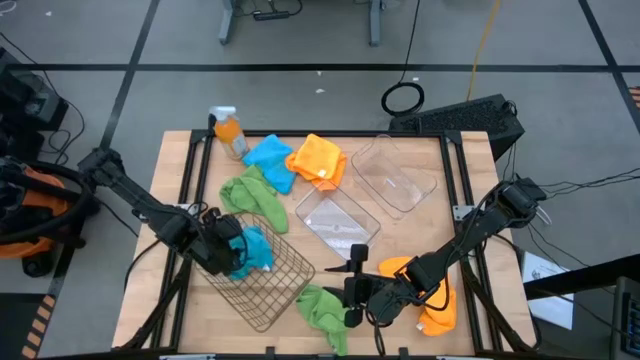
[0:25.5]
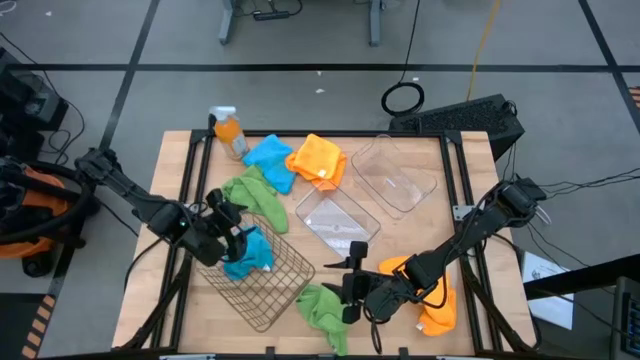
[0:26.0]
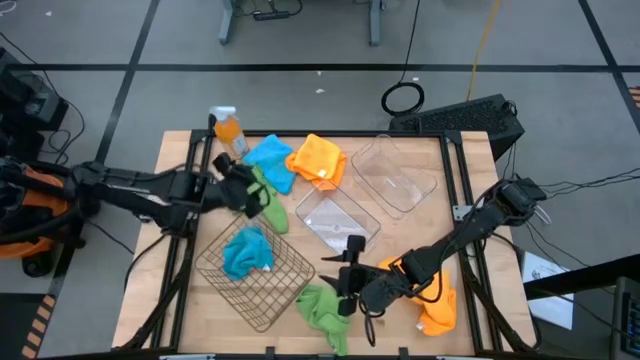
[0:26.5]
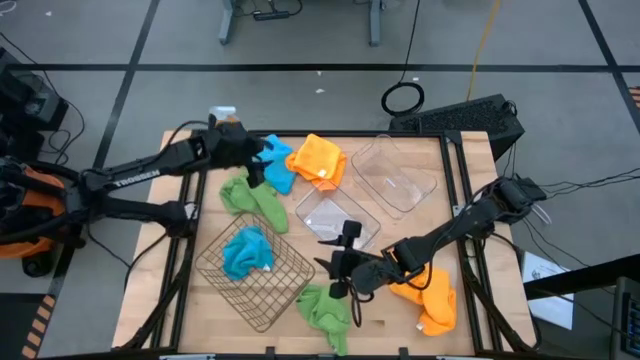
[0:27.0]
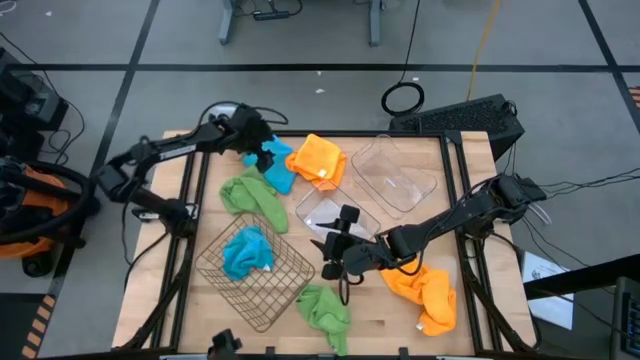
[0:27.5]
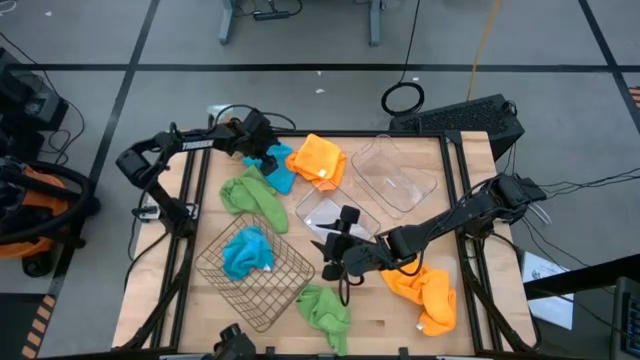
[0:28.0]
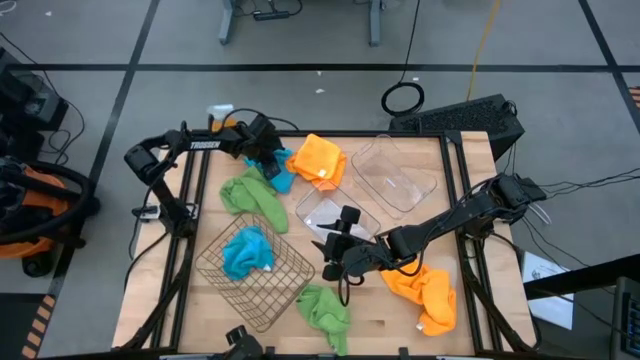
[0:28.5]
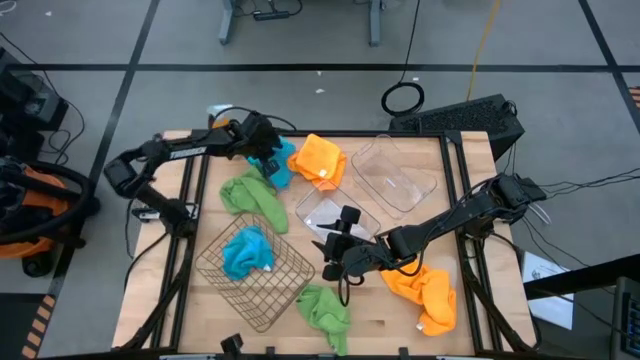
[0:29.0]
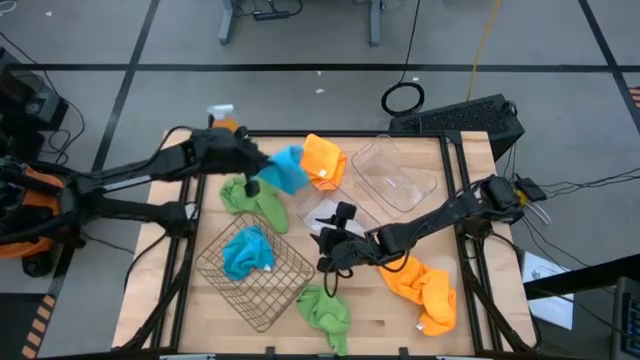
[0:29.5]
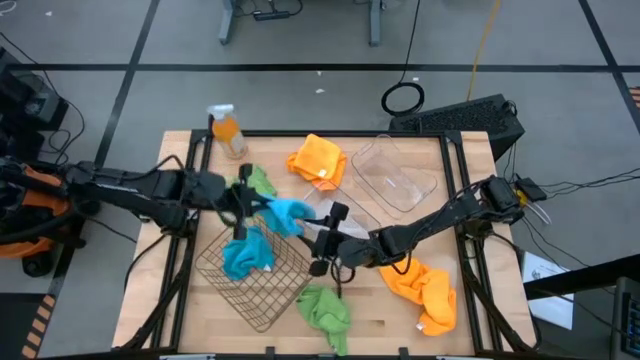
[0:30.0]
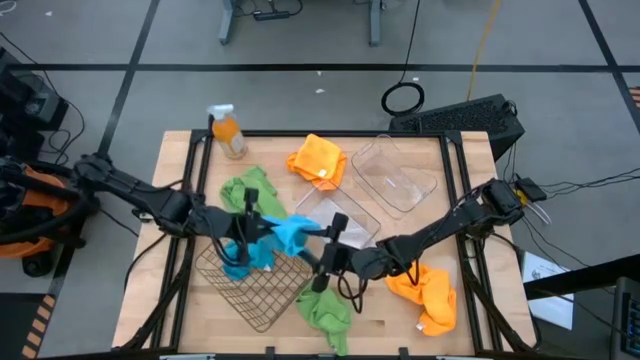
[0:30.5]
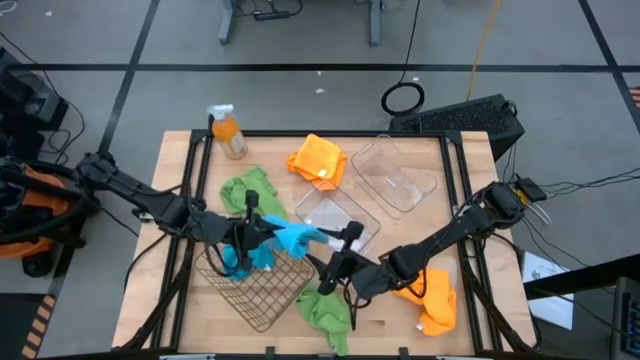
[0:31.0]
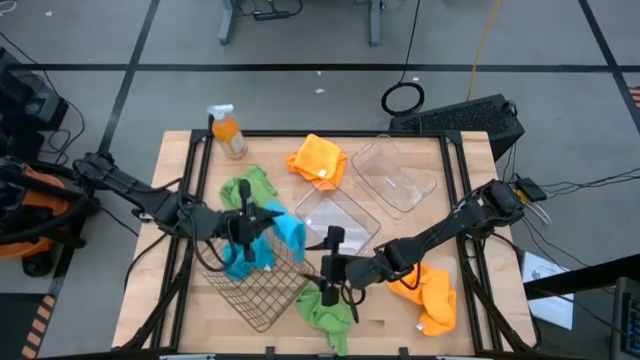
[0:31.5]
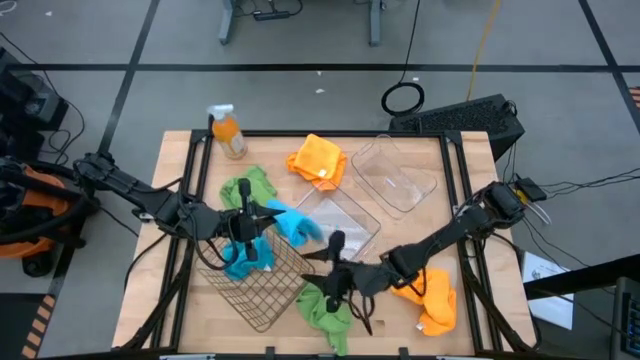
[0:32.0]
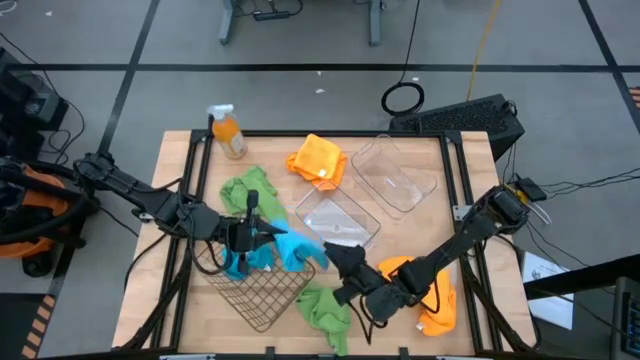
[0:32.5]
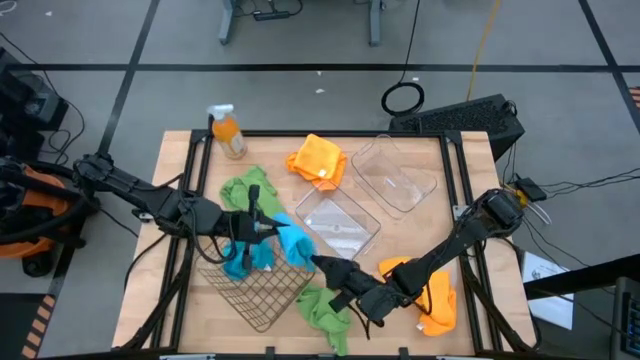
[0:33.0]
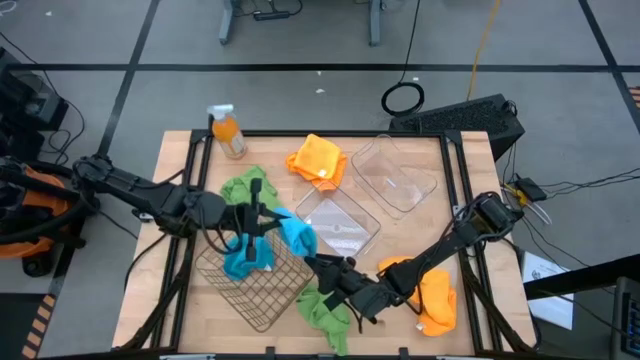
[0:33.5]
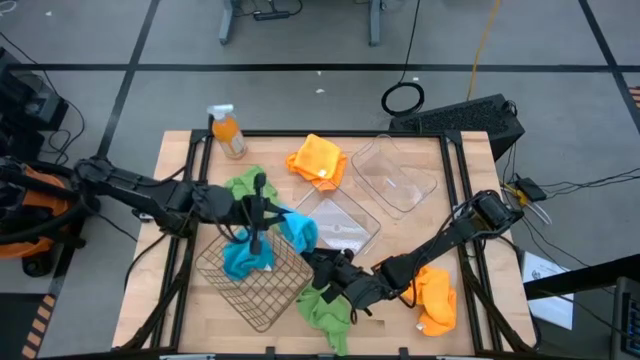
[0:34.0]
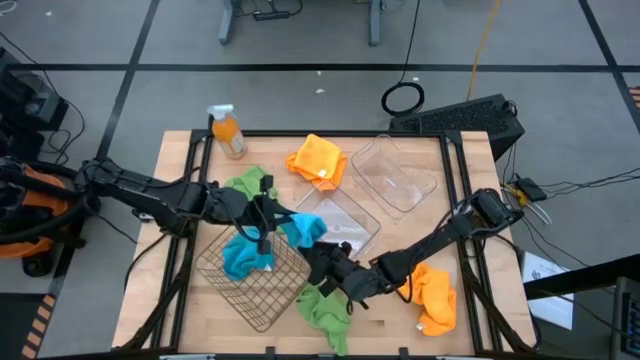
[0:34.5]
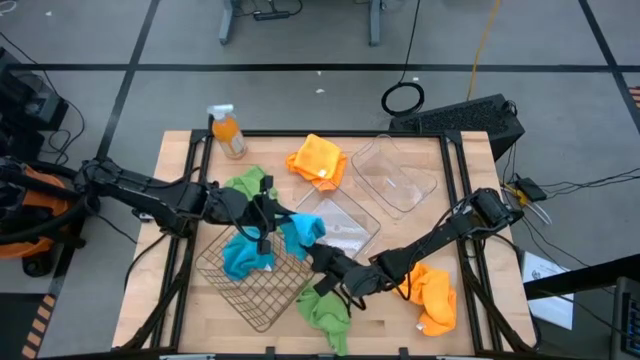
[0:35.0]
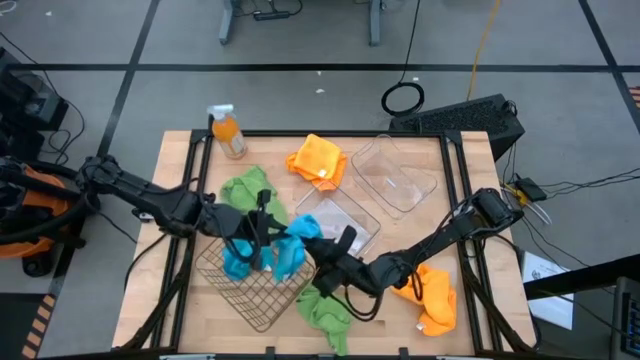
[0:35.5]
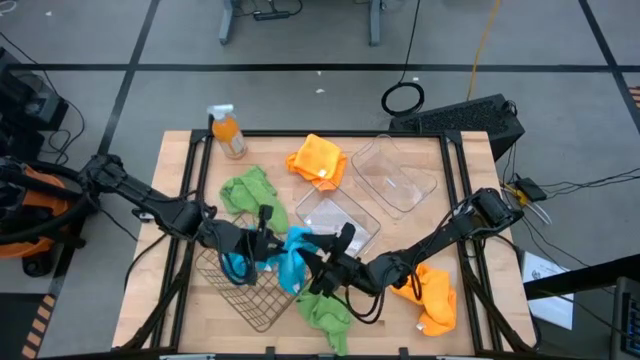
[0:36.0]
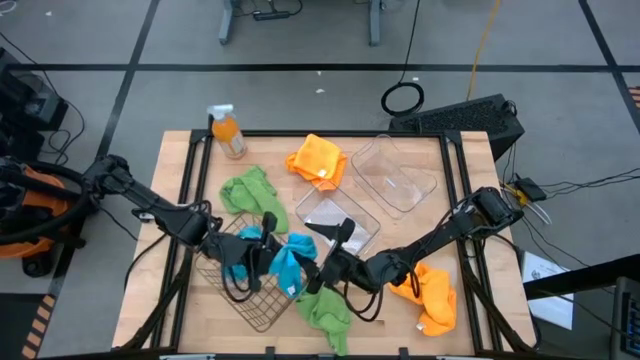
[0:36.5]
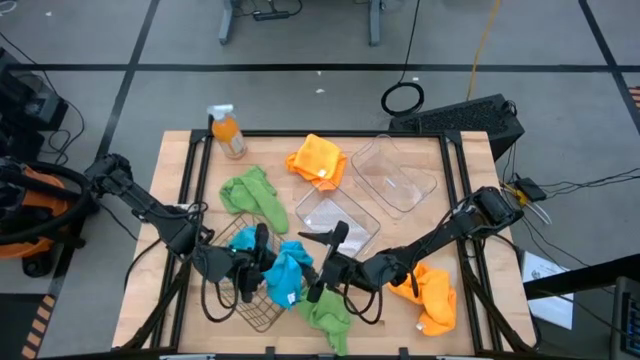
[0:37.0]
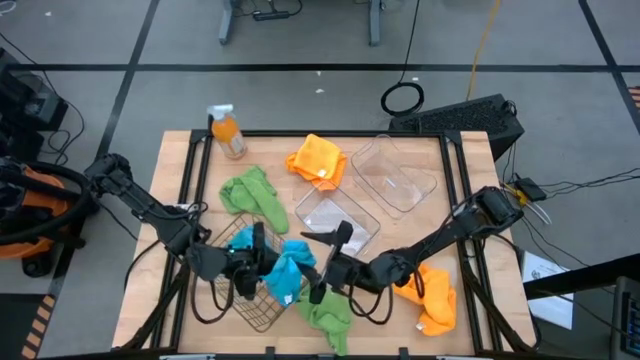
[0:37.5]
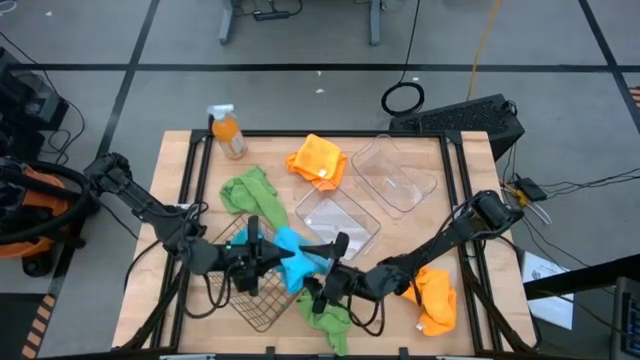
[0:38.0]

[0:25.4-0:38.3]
Task: Sort microfiber towel by color & place in baskets
Put the blue microfiber towel into the wire basket
